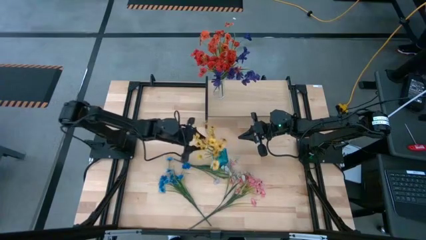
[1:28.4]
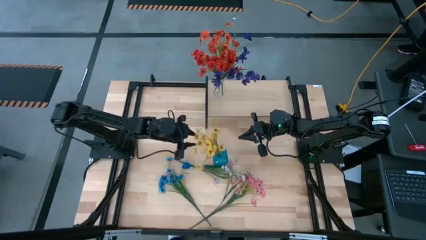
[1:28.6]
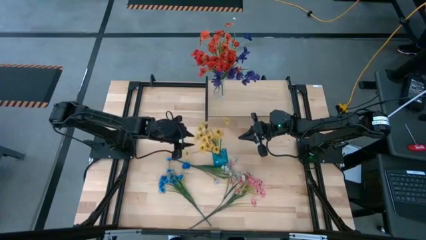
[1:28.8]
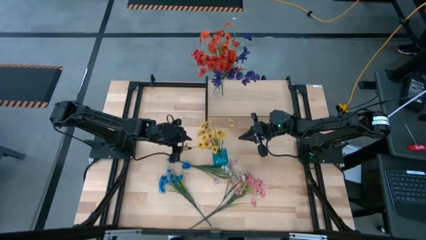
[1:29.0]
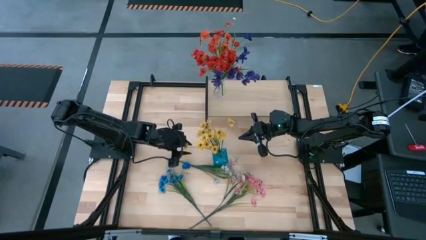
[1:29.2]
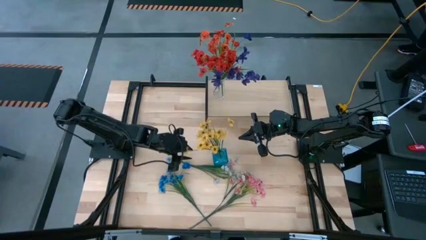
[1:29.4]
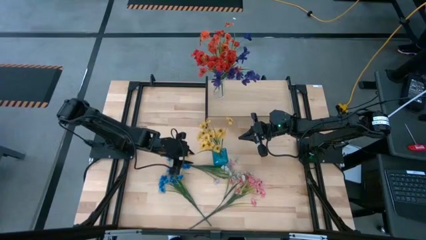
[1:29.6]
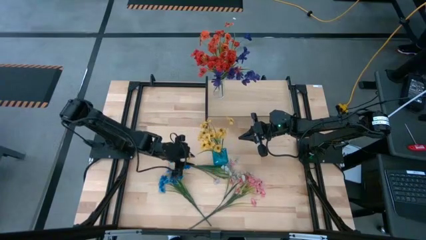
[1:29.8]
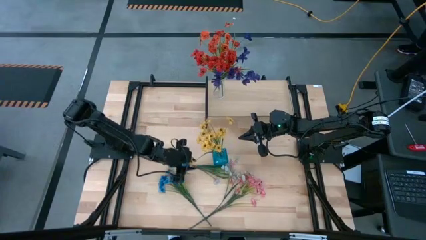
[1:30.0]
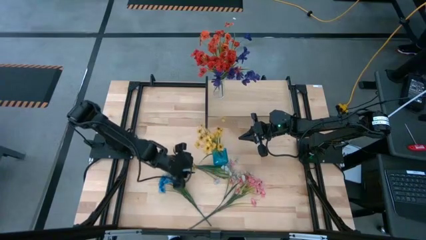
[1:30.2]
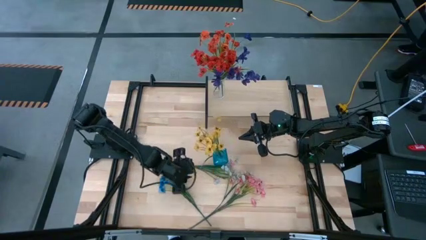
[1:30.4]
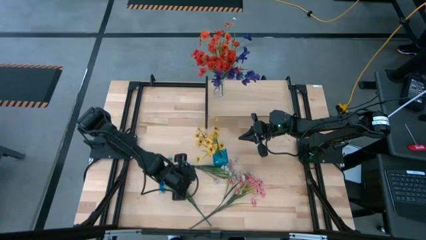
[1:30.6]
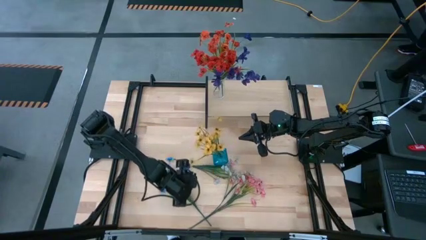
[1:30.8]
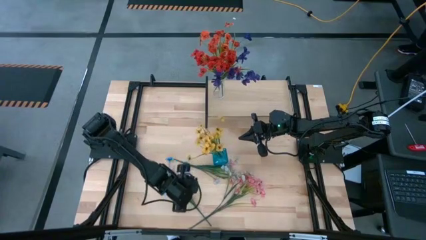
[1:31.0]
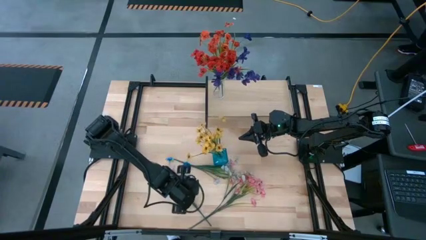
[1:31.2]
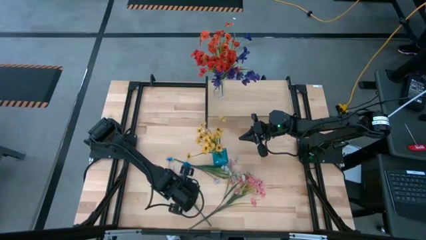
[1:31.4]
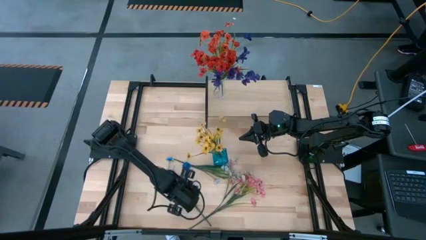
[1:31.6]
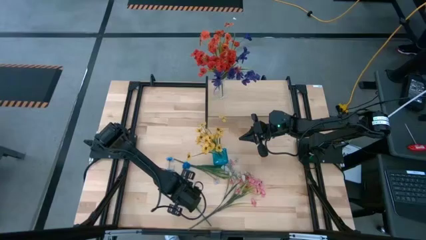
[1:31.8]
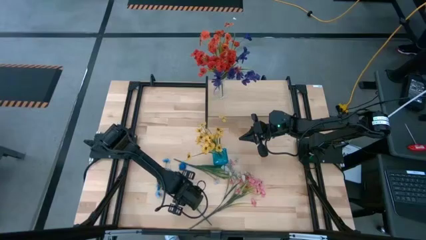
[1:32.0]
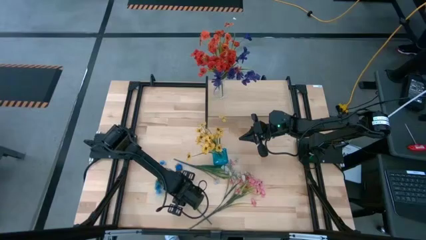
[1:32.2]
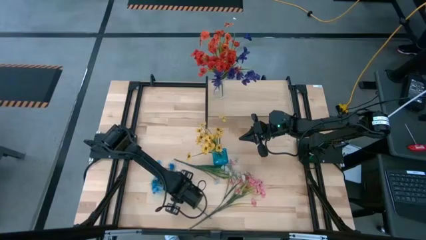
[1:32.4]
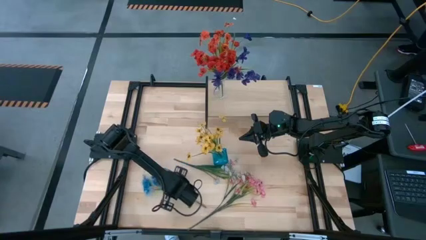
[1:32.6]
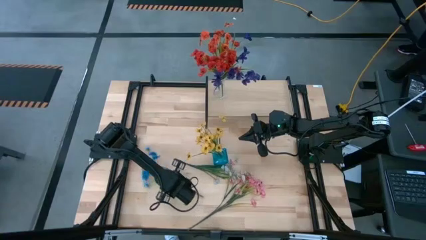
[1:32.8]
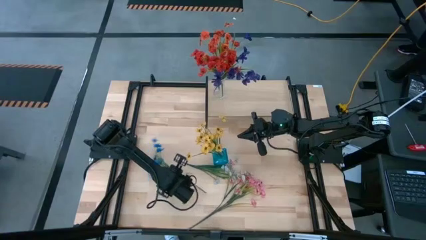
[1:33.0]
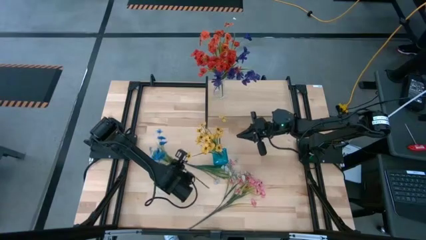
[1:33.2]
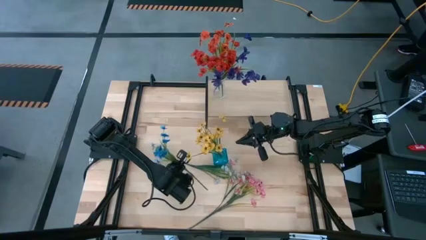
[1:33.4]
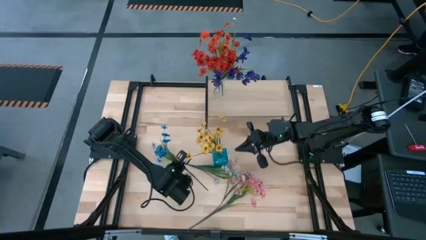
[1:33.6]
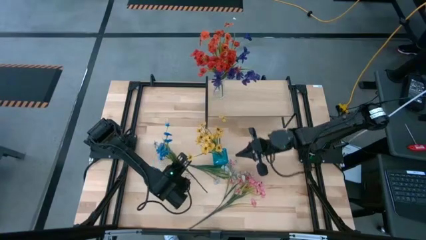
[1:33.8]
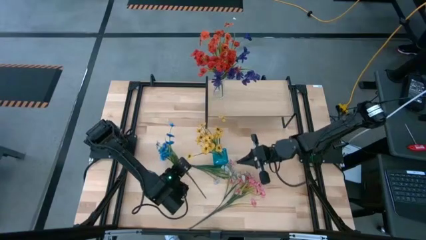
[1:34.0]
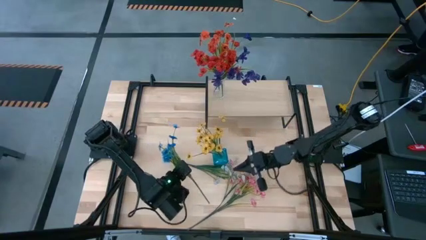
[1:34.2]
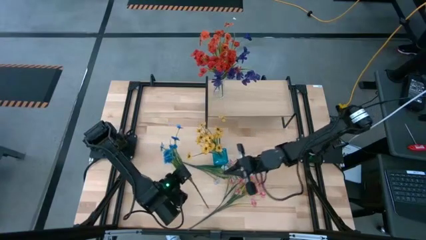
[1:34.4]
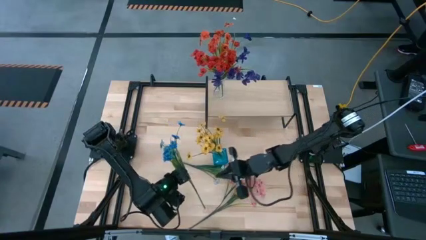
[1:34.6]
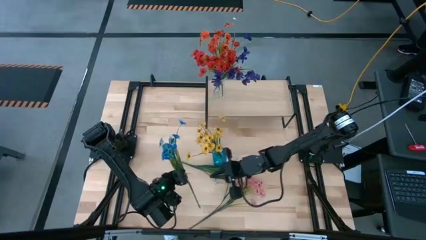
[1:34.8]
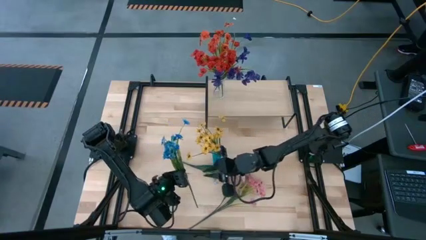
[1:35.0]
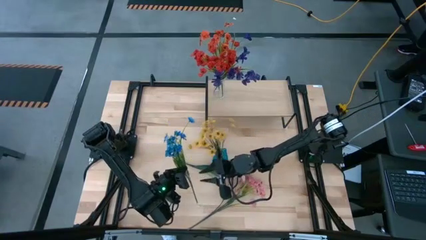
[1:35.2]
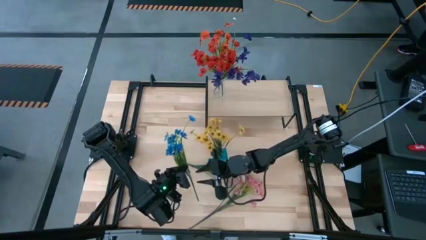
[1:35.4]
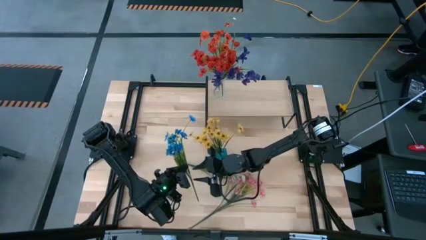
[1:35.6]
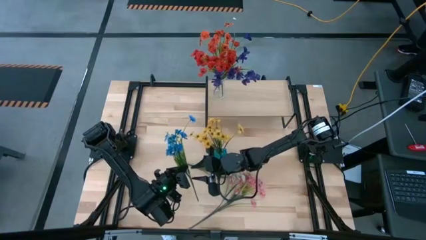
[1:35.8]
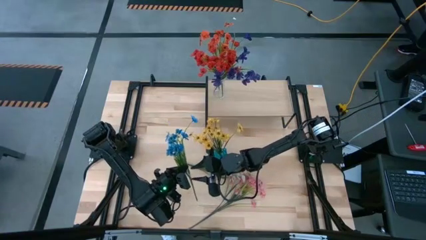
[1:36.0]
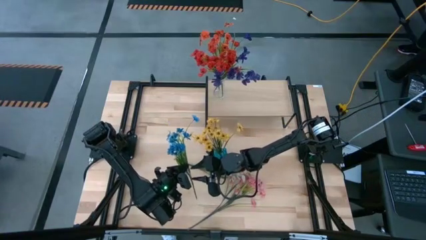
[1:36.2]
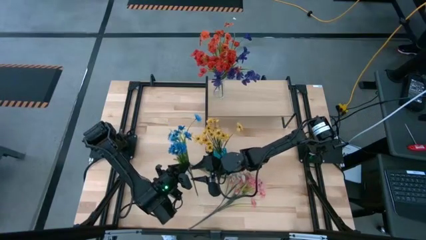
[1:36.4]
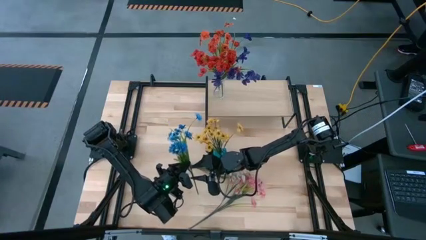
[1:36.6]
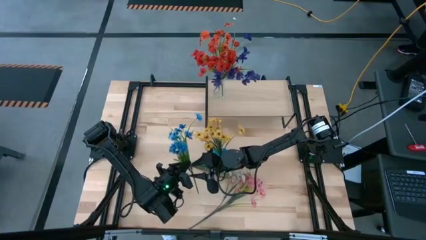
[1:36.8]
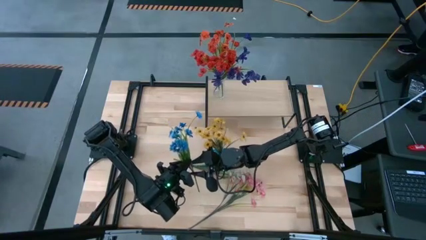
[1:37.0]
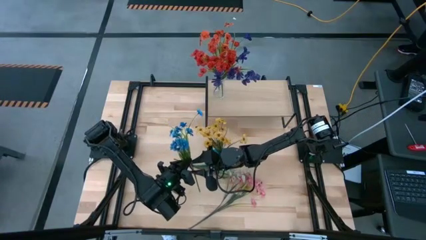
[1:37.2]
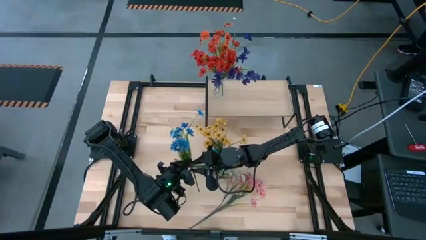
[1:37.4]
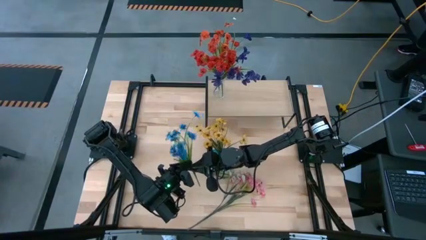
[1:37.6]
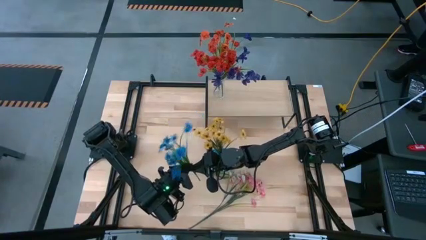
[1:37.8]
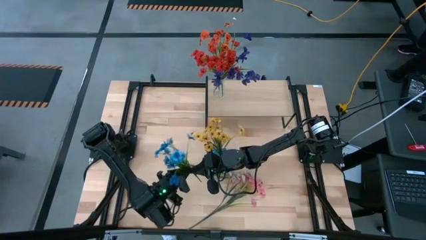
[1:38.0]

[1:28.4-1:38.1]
Task: Pick and place flowers into a vace then onto a shelf
Put the blue flowers into the blue vase

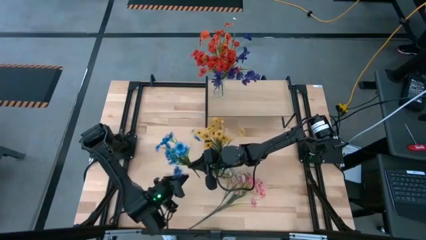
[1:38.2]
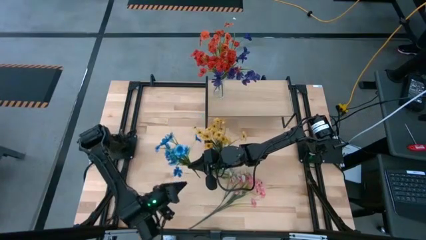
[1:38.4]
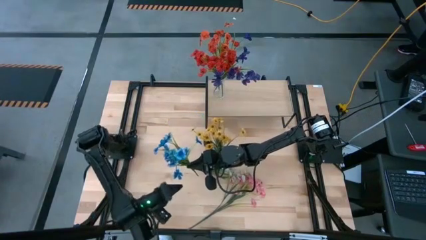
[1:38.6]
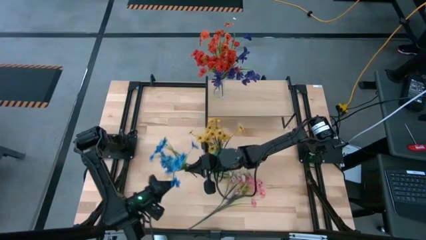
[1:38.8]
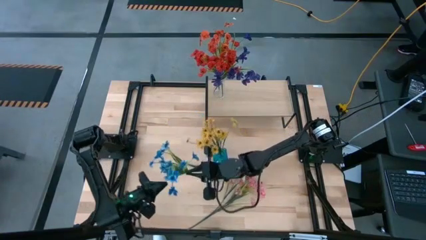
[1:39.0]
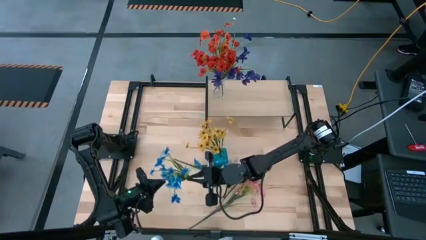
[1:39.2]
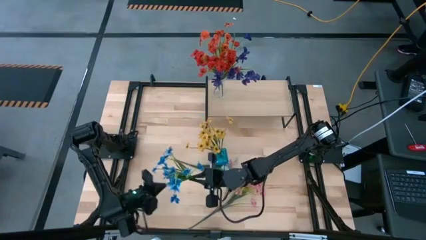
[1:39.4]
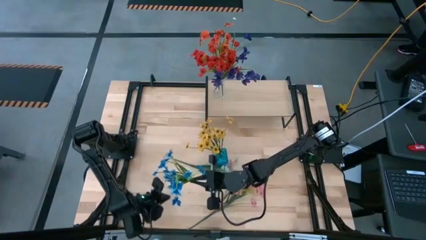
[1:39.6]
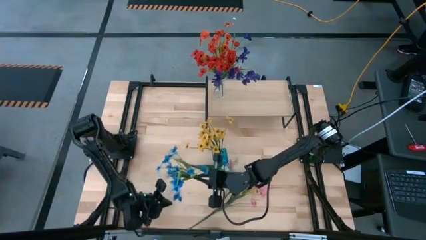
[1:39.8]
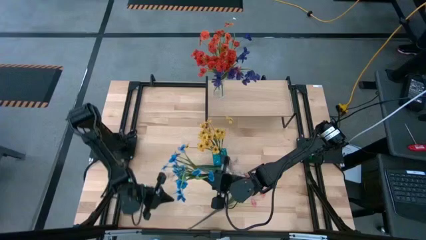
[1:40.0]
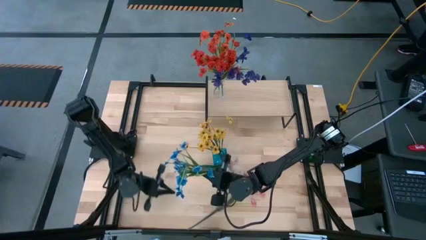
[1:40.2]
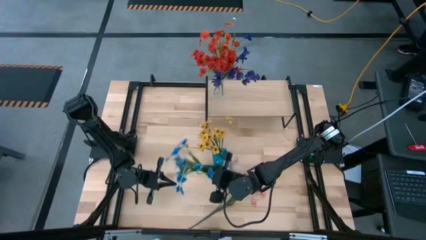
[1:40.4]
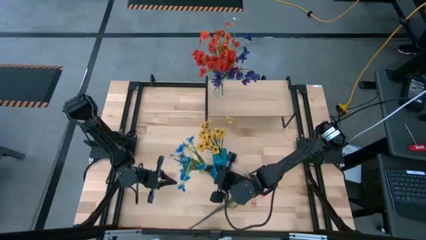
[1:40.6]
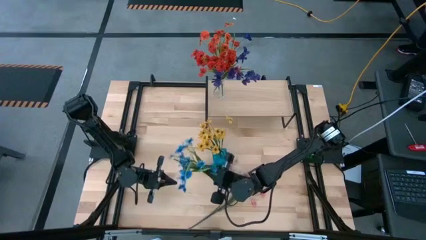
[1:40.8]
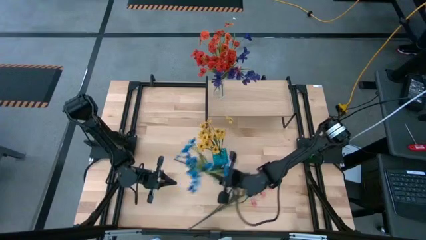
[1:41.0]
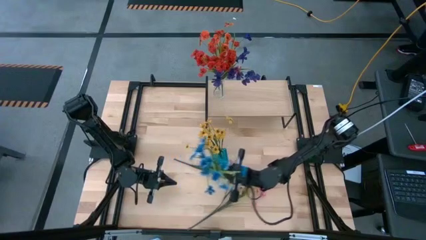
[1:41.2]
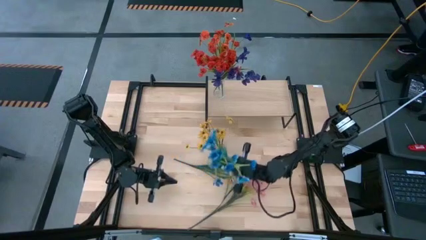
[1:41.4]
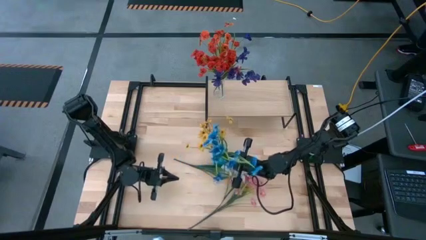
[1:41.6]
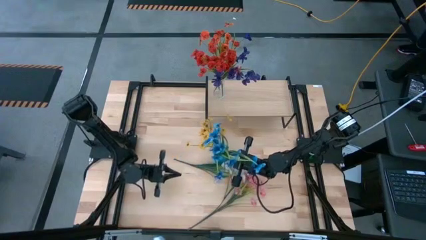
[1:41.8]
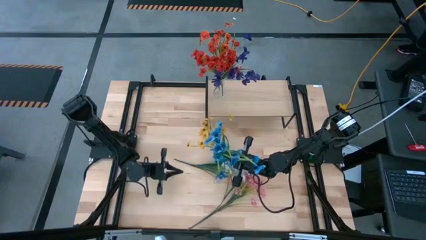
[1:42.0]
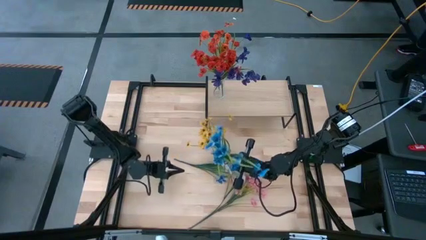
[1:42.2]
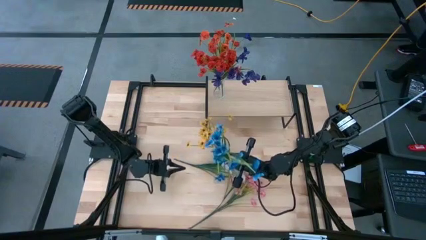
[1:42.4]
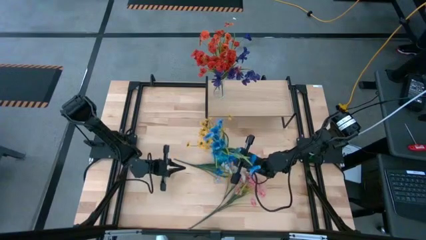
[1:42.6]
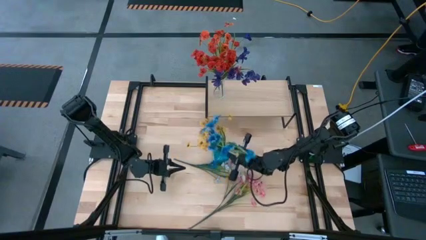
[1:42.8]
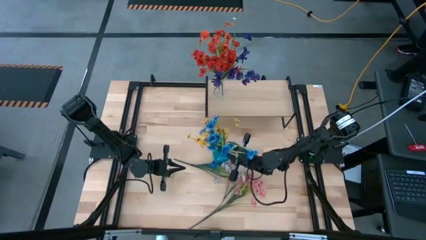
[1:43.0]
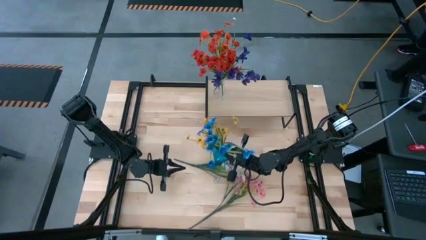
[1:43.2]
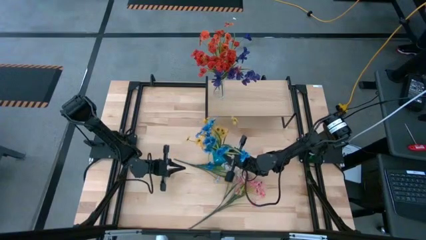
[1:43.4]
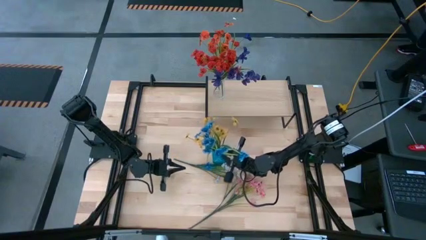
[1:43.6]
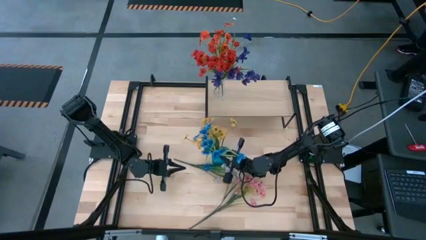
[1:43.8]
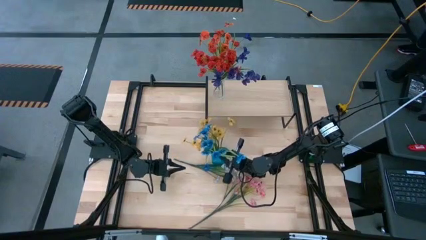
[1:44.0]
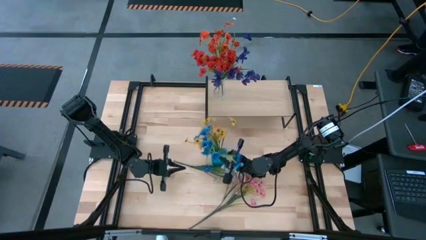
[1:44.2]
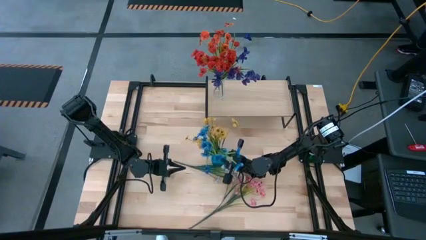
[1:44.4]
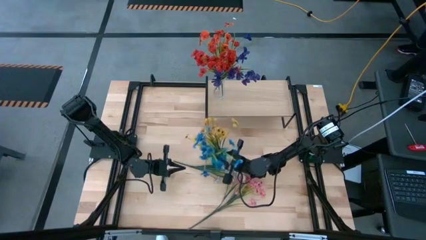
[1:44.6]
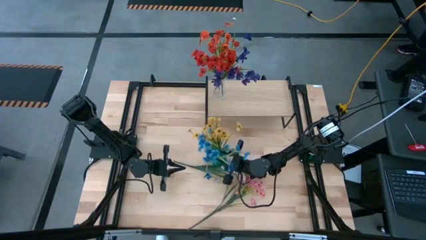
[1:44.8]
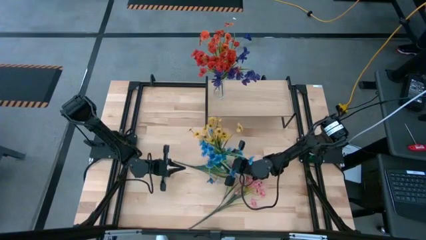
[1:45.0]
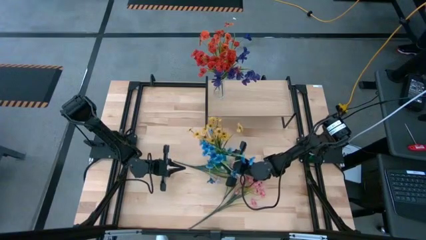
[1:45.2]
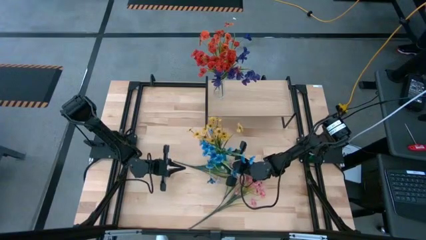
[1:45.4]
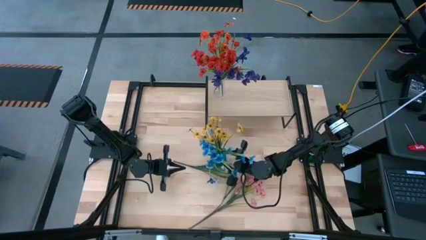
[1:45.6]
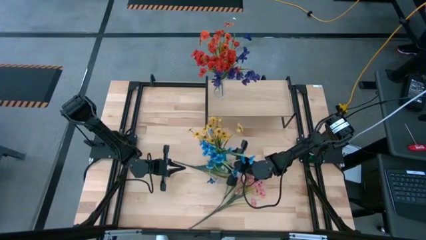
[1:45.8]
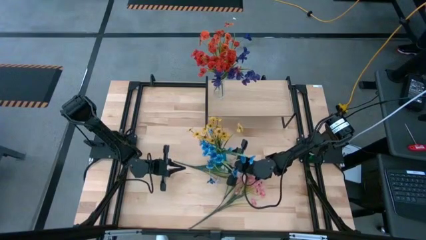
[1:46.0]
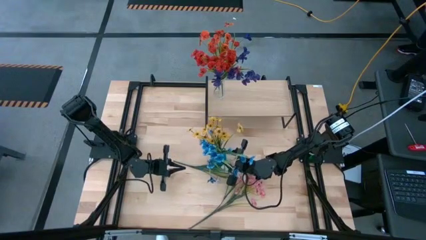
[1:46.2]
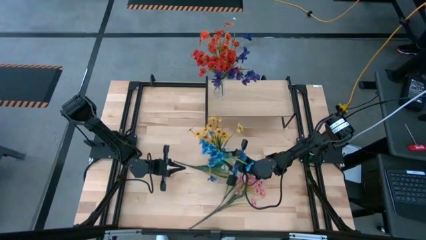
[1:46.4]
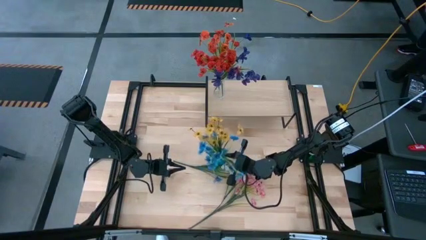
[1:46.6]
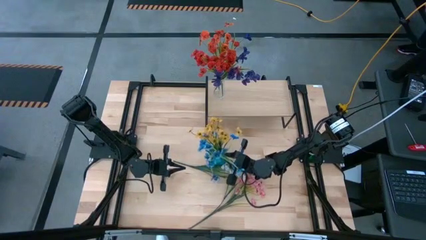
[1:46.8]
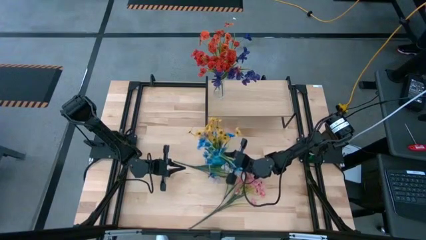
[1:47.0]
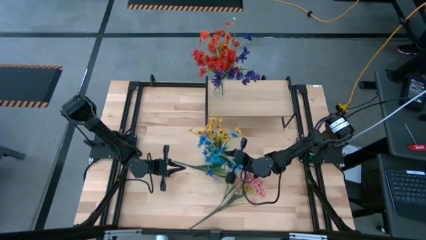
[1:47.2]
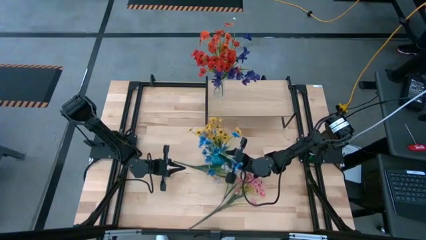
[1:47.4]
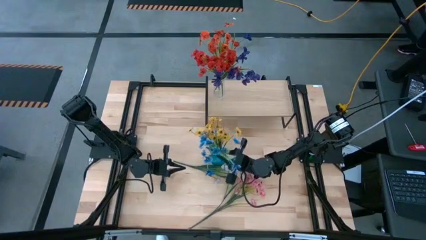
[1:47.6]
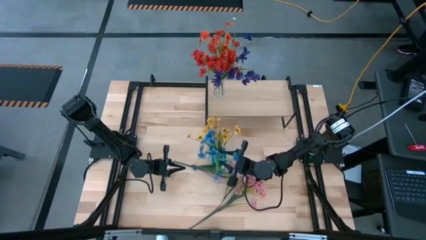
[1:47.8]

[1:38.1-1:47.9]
Put the blue flowers into the blue vase
